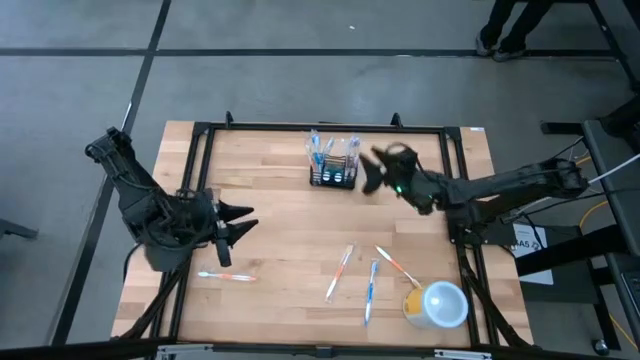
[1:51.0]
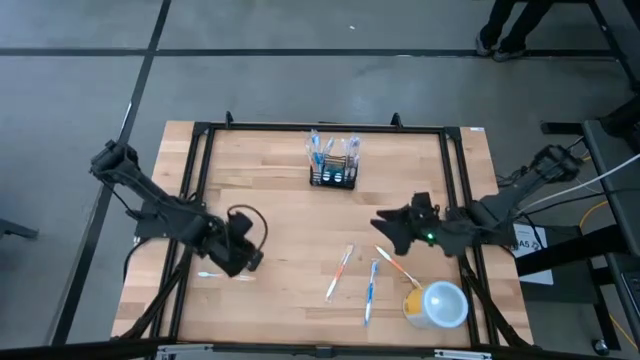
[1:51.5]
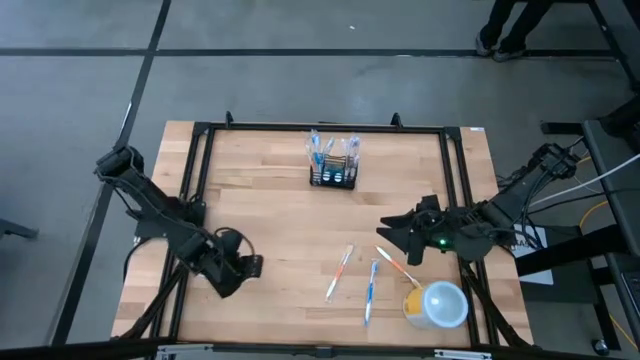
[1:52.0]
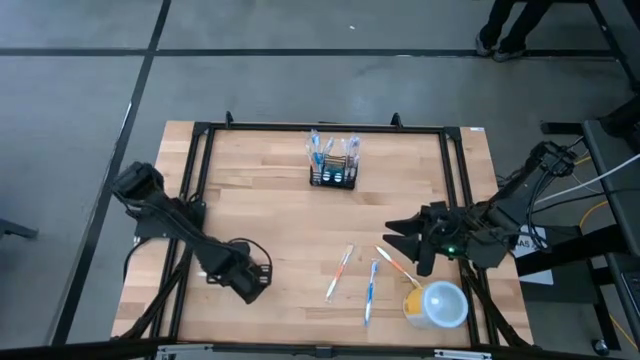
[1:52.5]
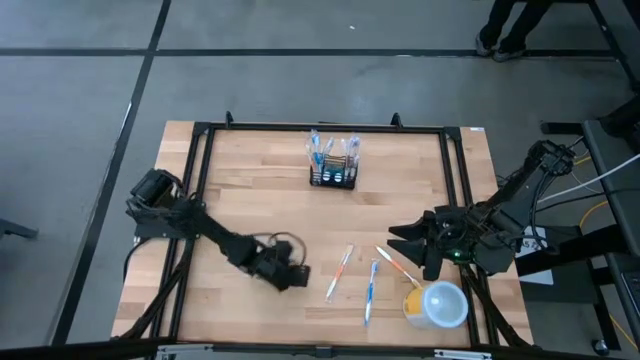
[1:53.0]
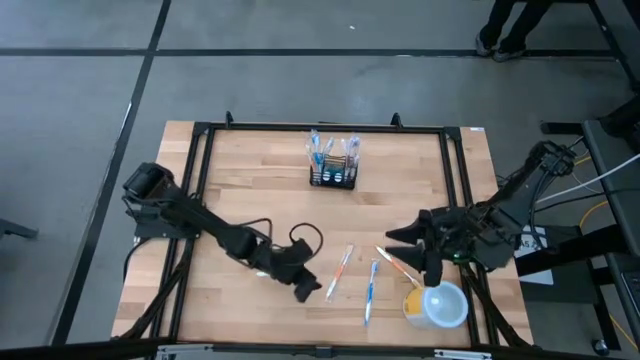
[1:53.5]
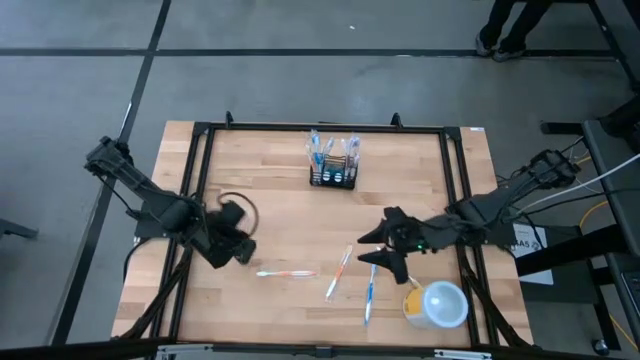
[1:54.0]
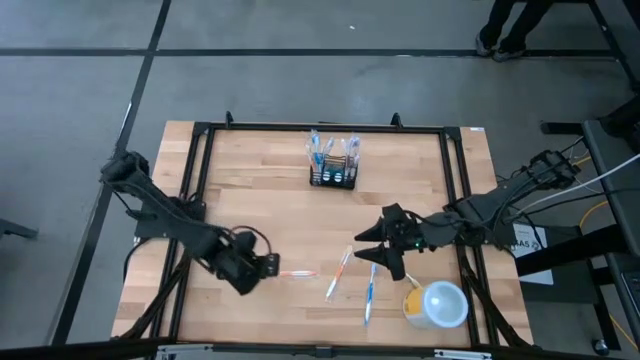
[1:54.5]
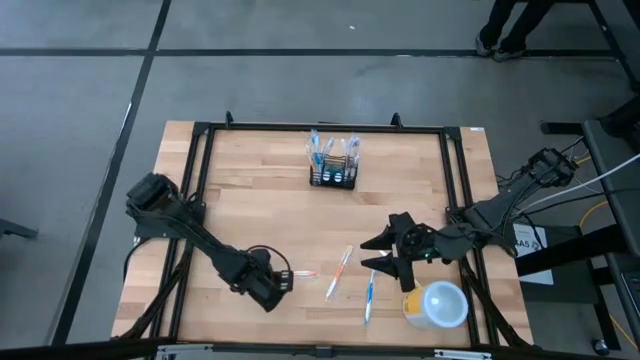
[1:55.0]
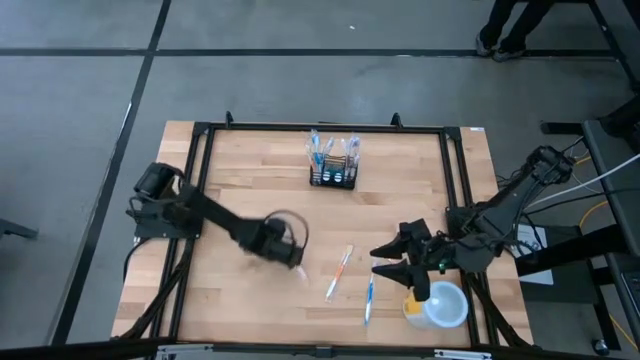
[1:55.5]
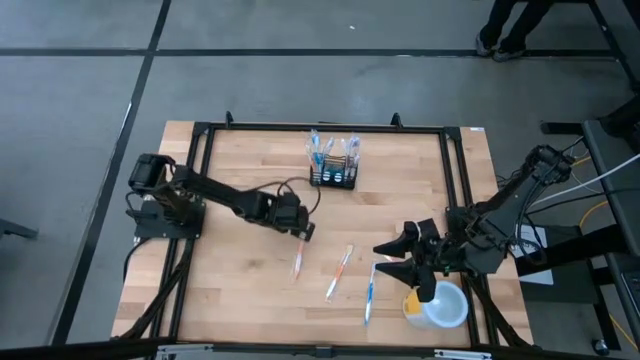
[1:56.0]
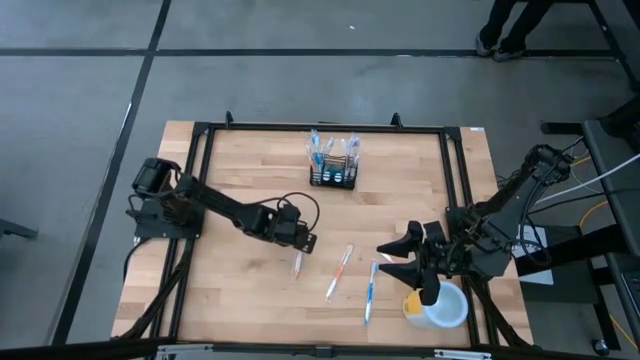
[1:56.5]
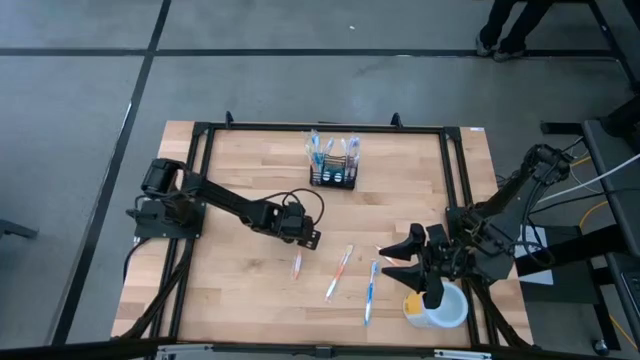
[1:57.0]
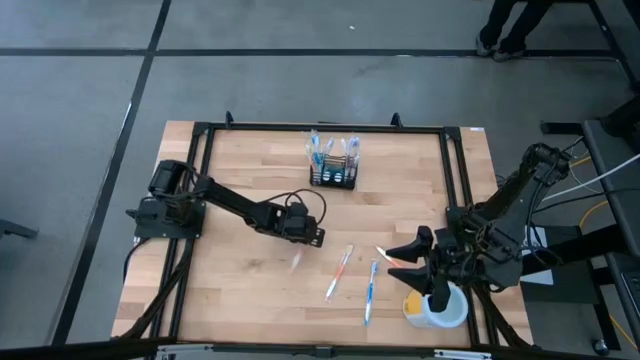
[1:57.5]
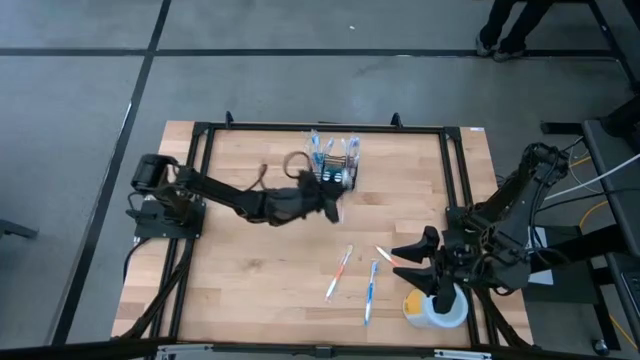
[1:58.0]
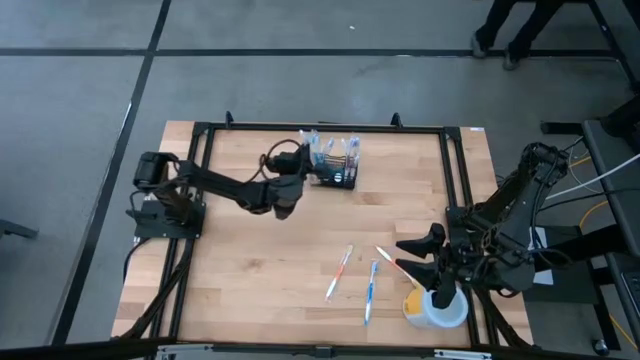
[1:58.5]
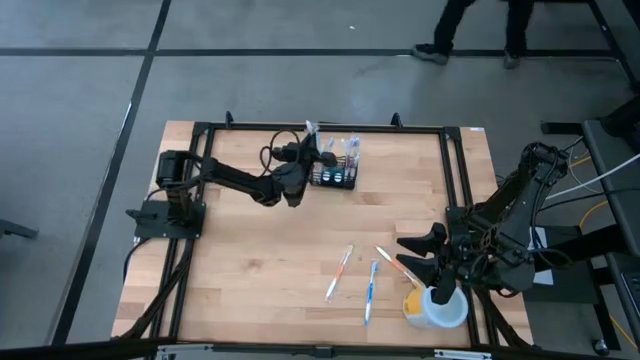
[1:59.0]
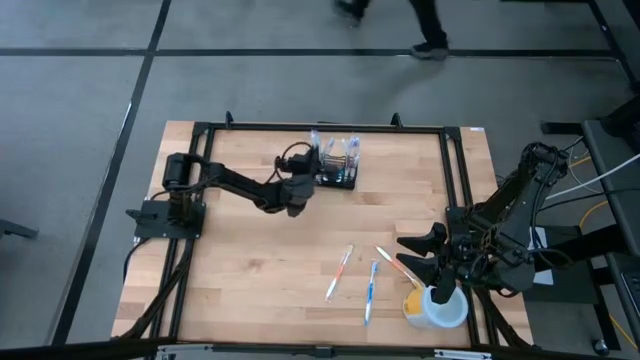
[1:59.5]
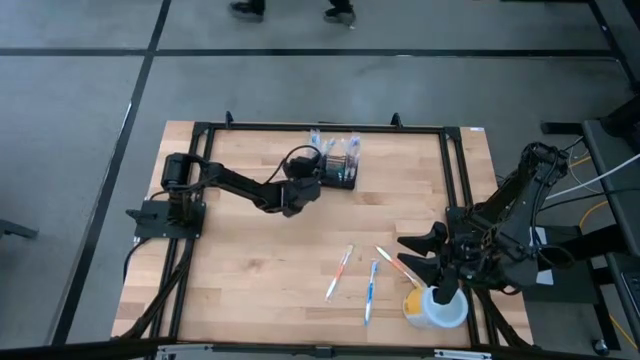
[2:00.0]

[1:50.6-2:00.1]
Task: Pick & Place toothbrushing station
Put the left orange toothbrush into the left section of the mesh organizer

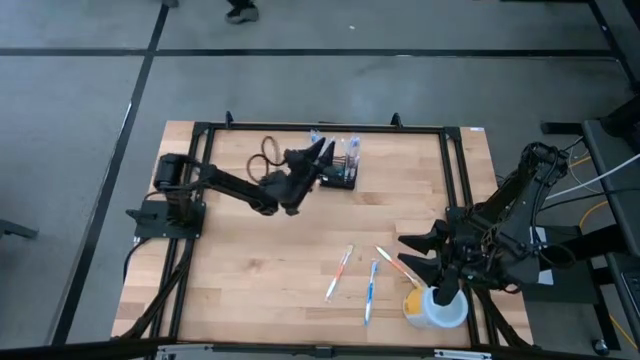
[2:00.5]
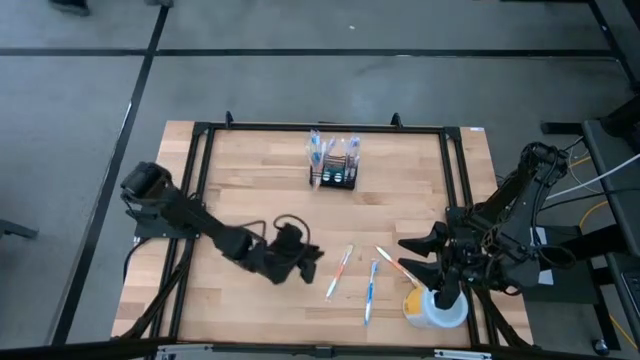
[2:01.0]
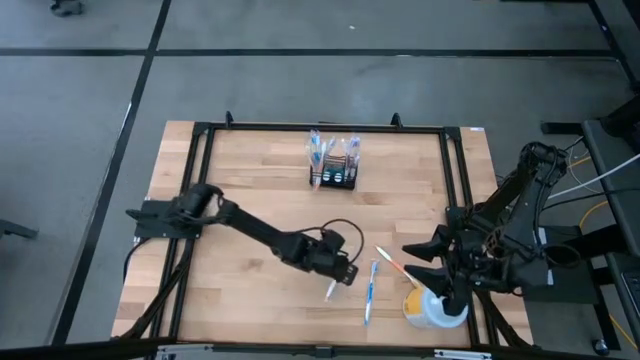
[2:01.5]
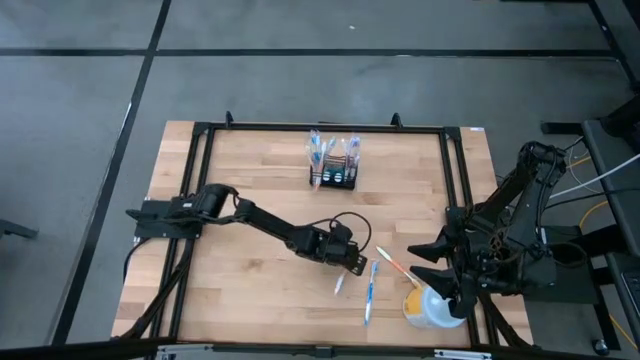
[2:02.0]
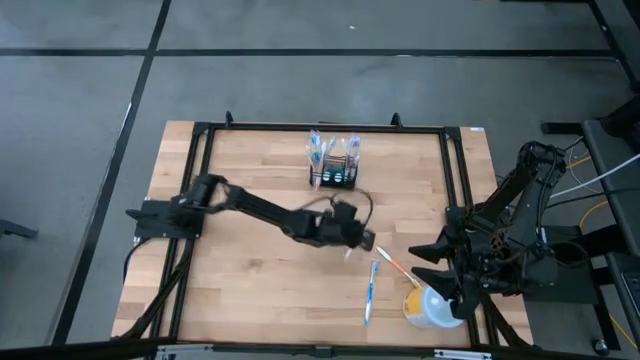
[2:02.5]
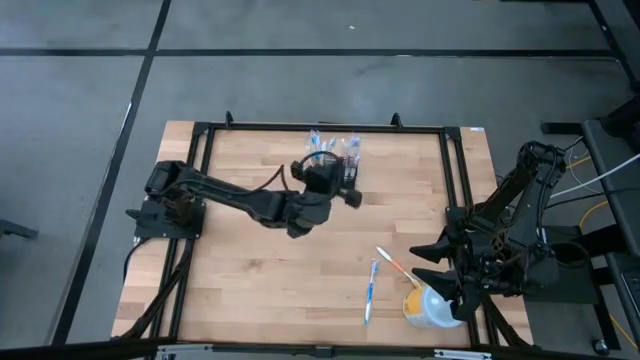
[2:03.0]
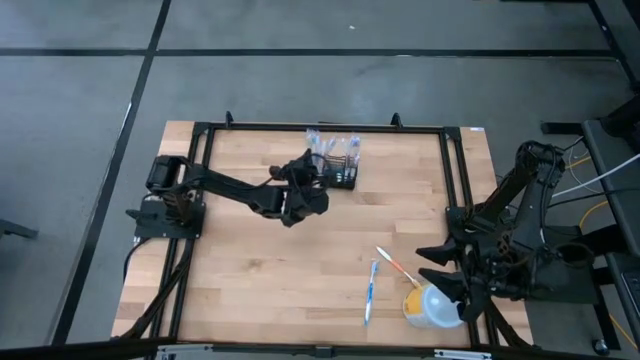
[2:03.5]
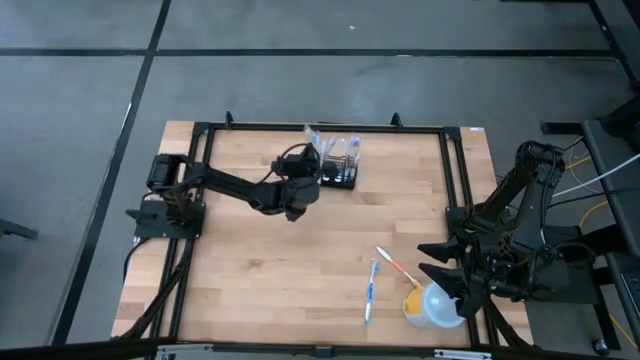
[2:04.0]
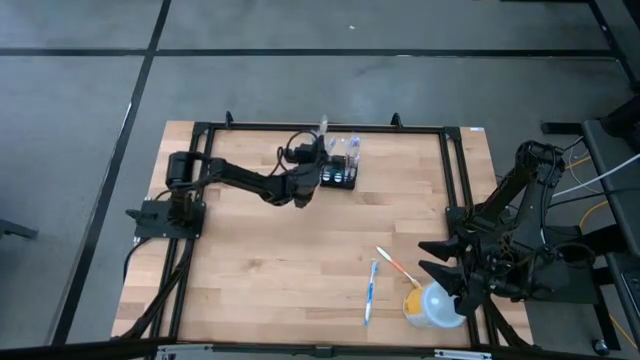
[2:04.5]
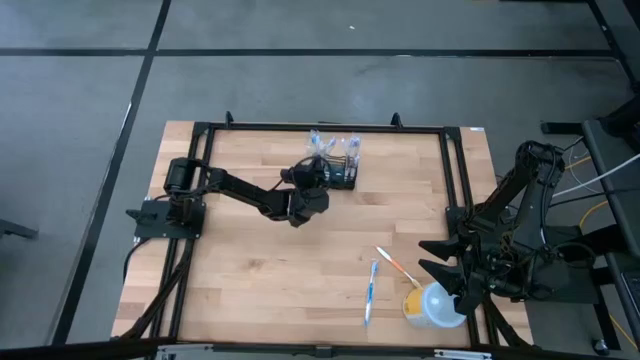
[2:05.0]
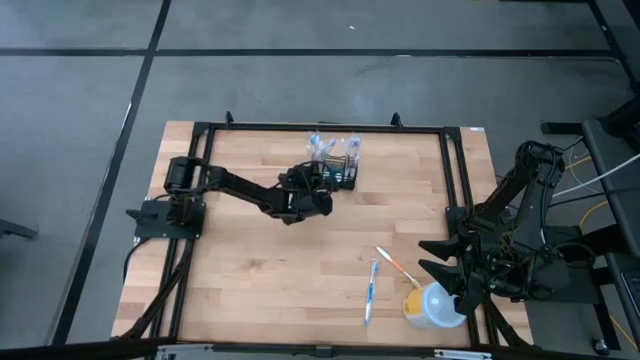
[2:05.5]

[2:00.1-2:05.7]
Put the left orange toothbrush into the left section of the mesh organizer

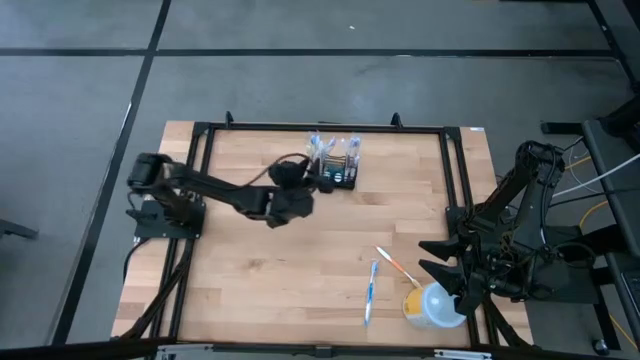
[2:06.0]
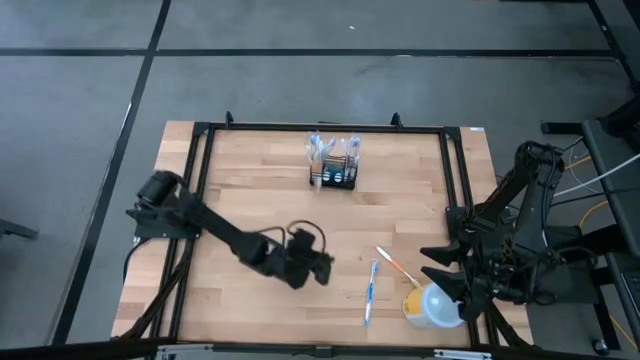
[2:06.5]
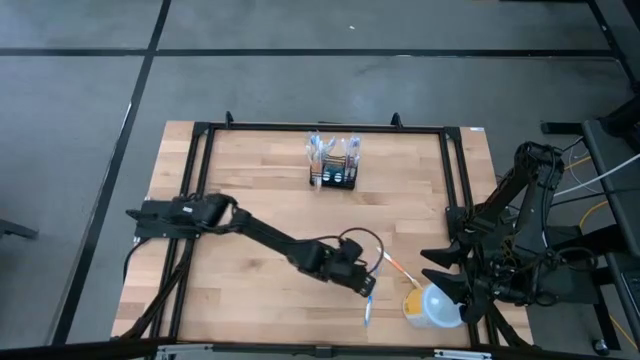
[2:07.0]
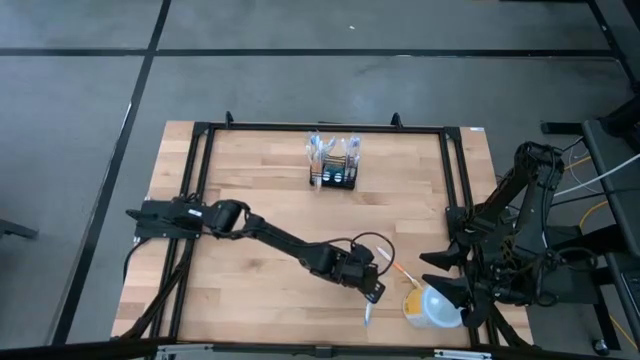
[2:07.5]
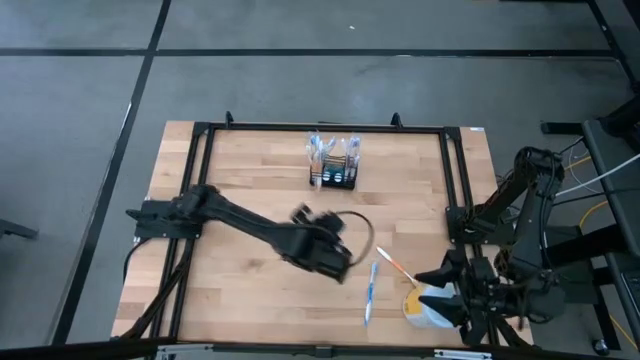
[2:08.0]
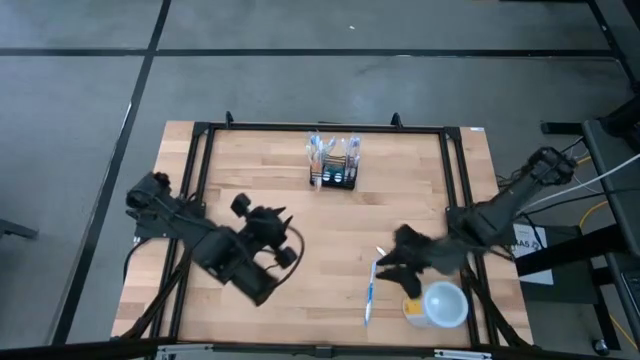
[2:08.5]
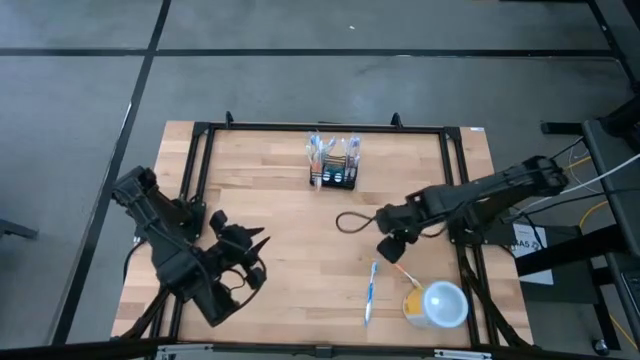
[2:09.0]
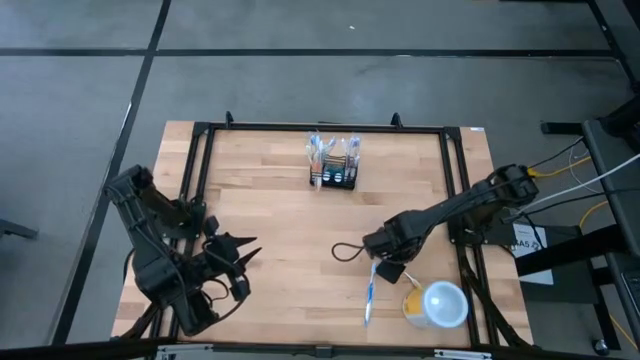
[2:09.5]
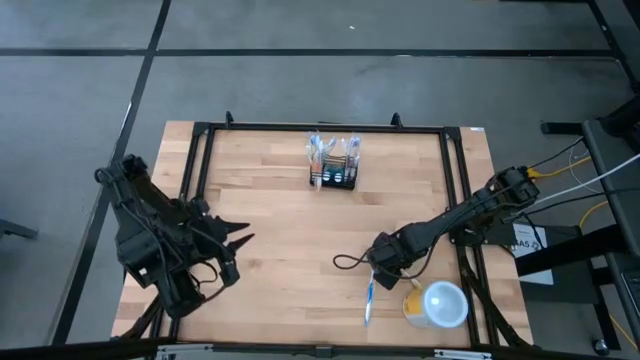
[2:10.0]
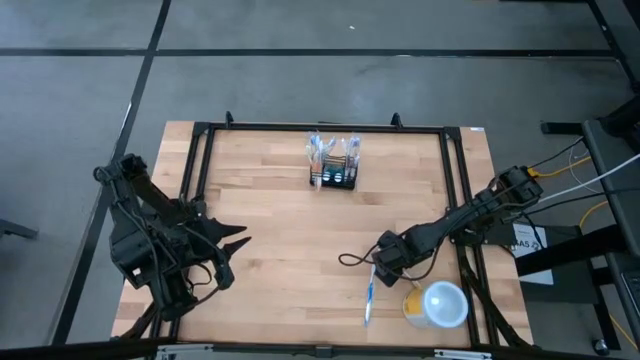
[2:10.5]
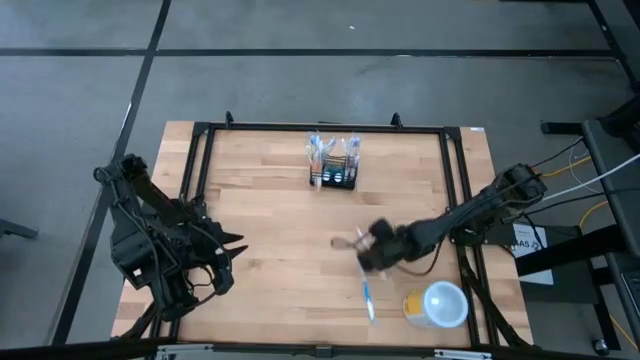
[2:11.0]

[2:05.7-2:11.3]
Put the orange toothbrush into the left section of the mesh organizer
